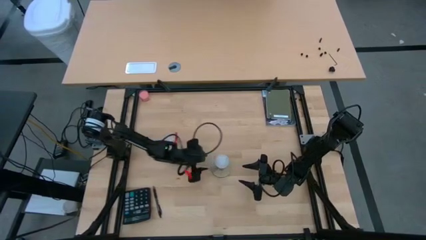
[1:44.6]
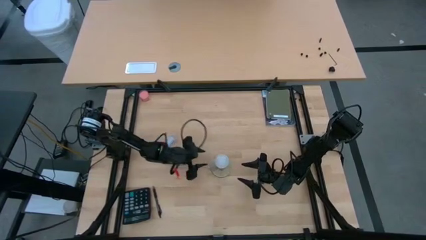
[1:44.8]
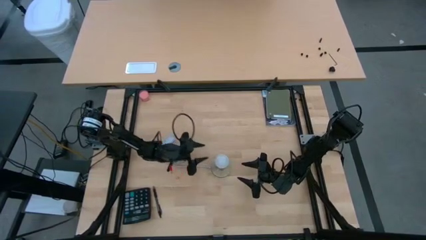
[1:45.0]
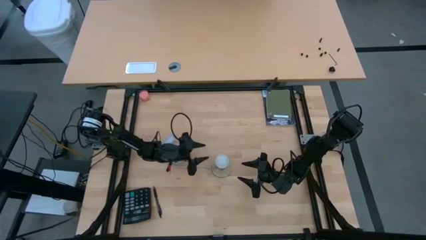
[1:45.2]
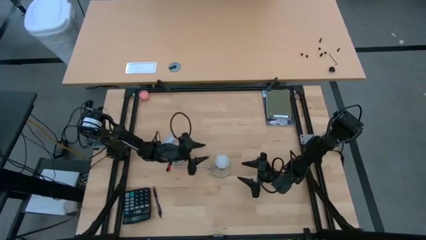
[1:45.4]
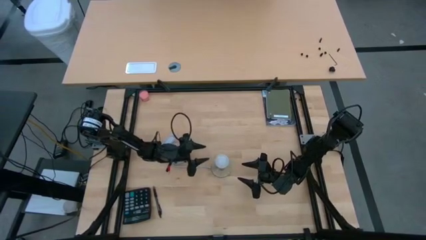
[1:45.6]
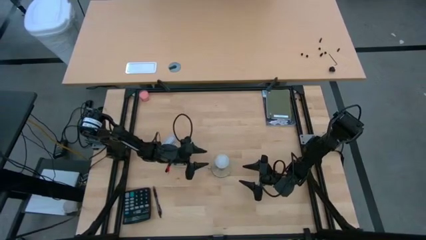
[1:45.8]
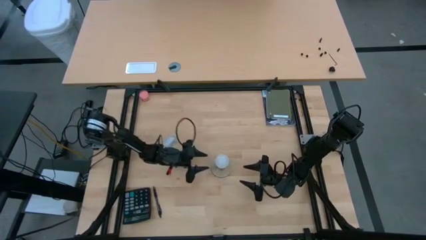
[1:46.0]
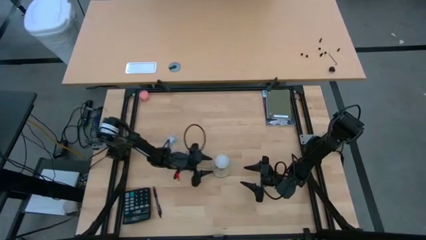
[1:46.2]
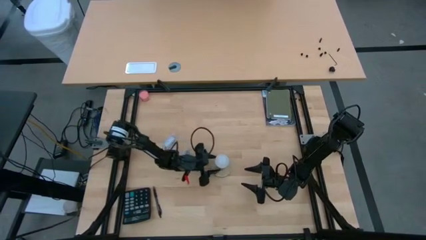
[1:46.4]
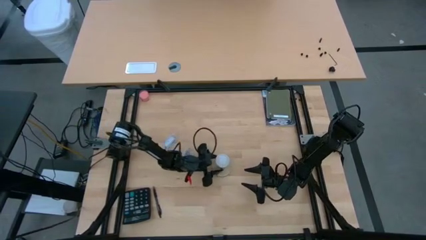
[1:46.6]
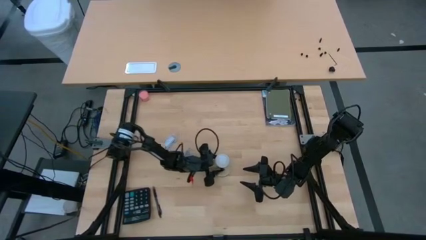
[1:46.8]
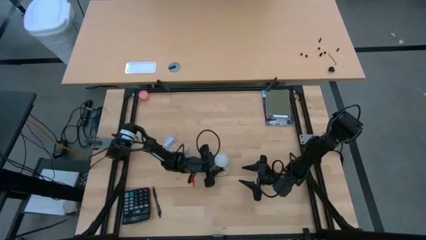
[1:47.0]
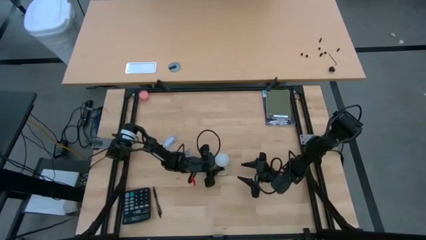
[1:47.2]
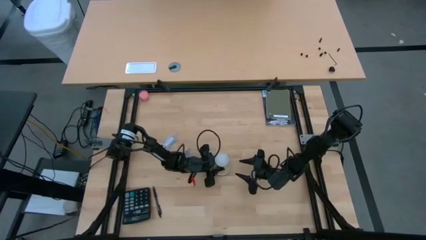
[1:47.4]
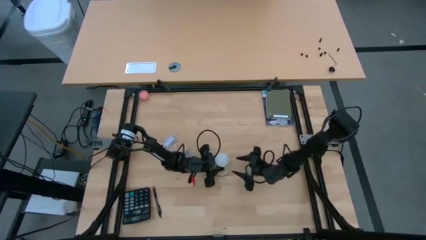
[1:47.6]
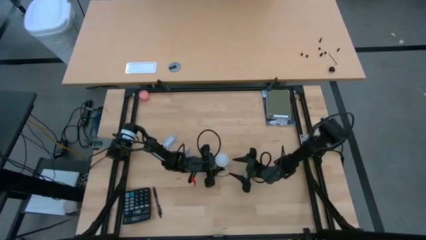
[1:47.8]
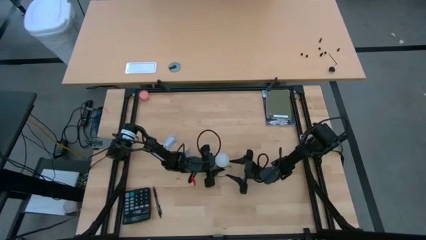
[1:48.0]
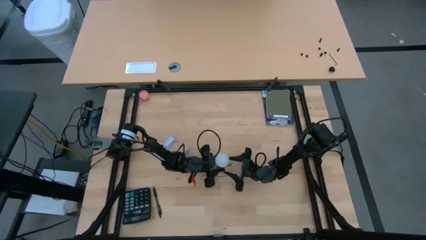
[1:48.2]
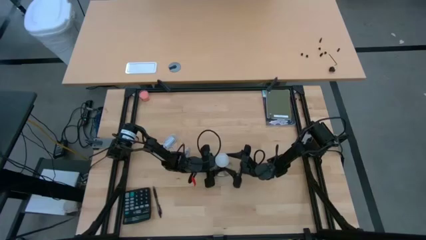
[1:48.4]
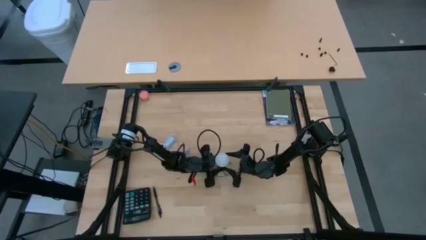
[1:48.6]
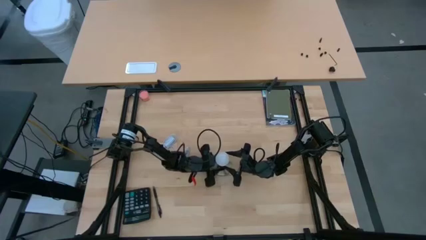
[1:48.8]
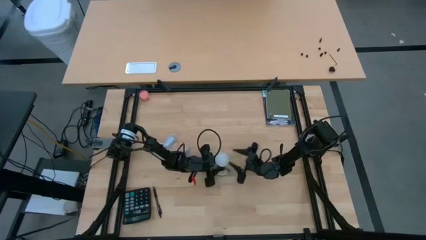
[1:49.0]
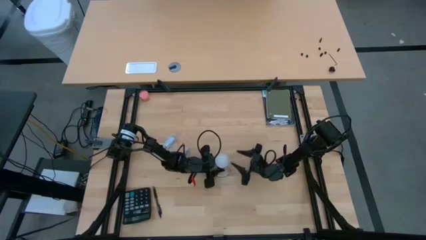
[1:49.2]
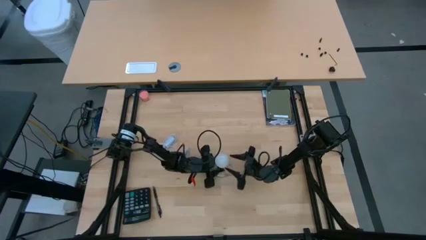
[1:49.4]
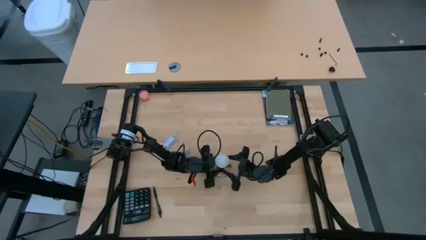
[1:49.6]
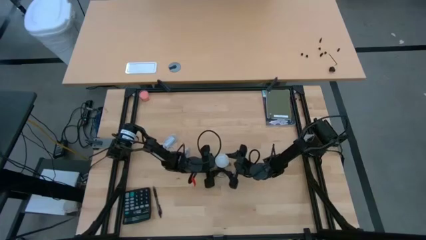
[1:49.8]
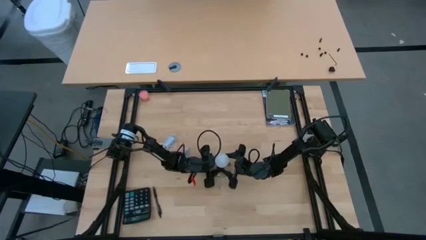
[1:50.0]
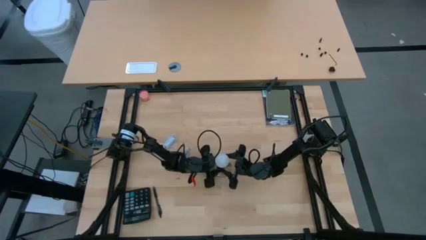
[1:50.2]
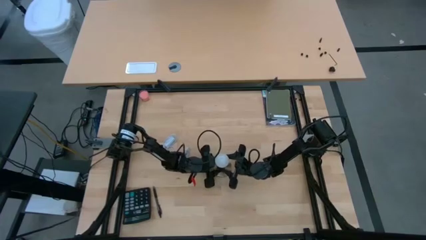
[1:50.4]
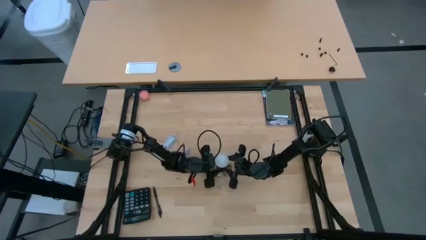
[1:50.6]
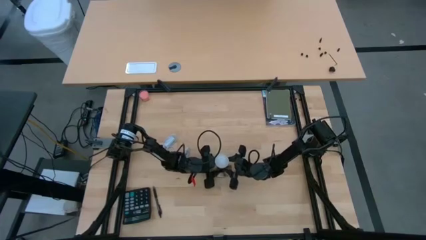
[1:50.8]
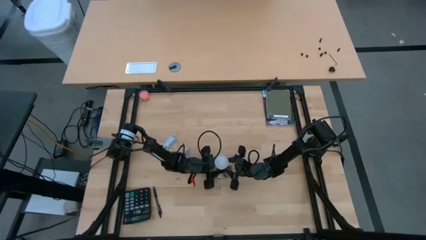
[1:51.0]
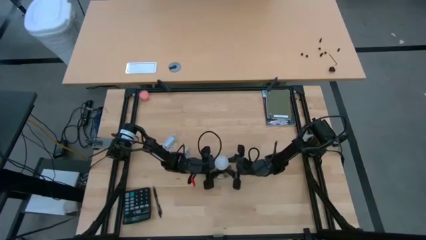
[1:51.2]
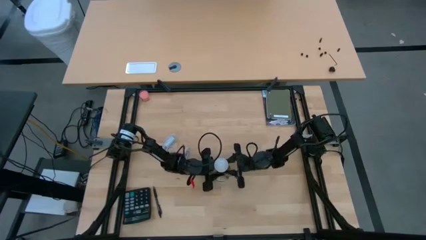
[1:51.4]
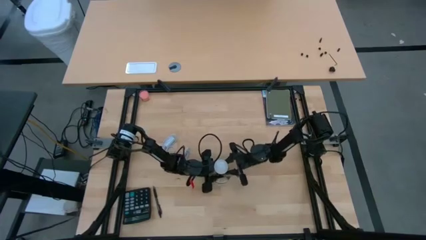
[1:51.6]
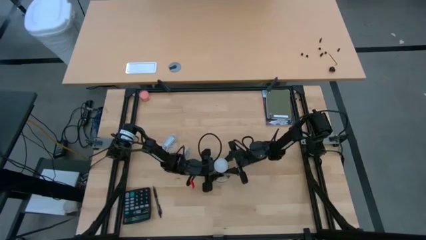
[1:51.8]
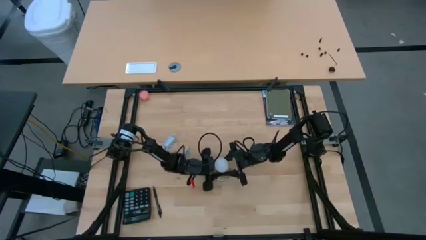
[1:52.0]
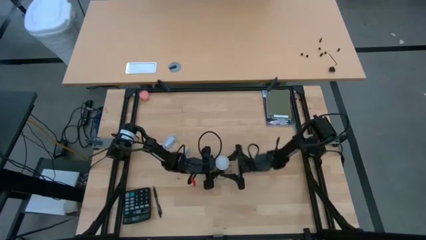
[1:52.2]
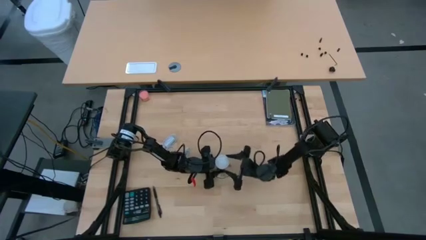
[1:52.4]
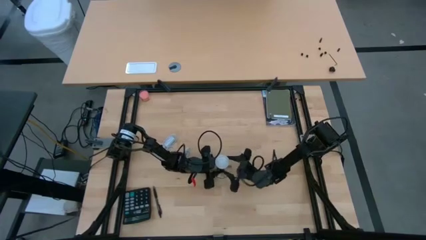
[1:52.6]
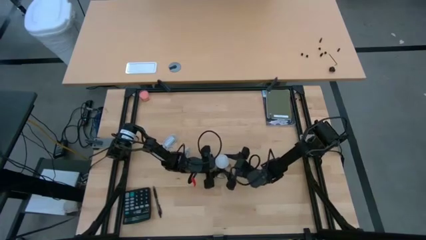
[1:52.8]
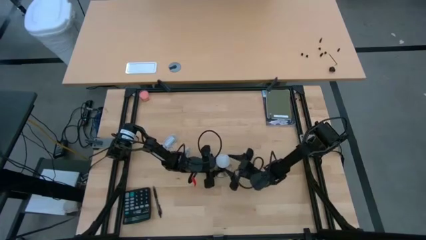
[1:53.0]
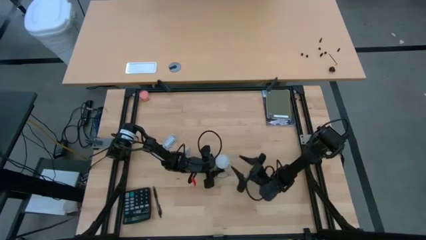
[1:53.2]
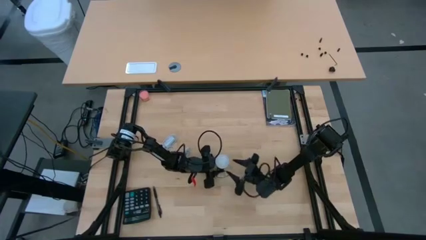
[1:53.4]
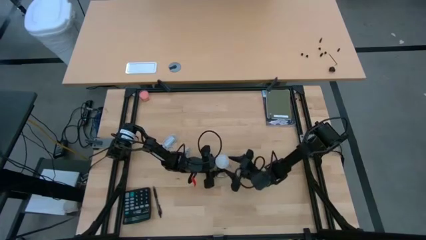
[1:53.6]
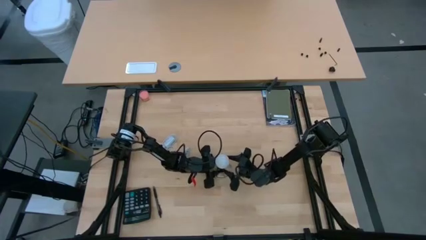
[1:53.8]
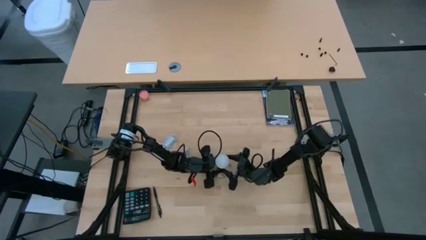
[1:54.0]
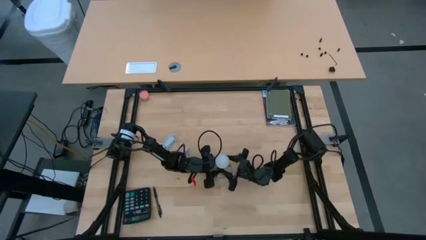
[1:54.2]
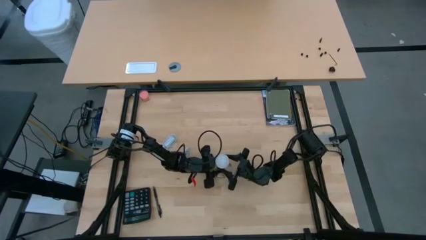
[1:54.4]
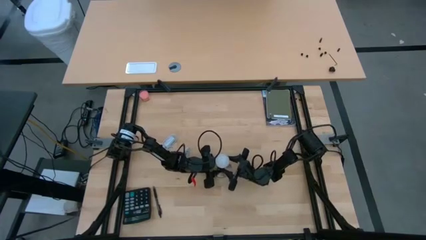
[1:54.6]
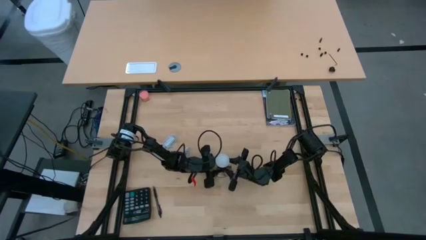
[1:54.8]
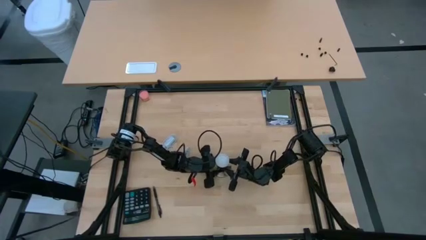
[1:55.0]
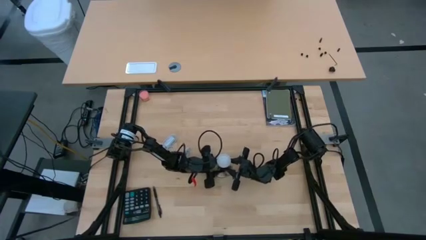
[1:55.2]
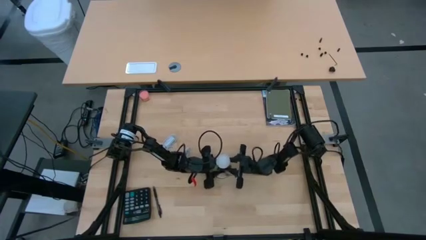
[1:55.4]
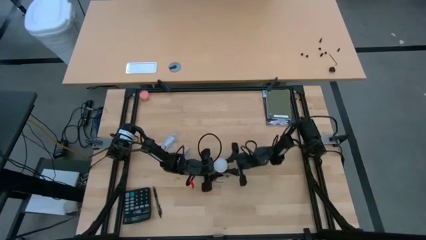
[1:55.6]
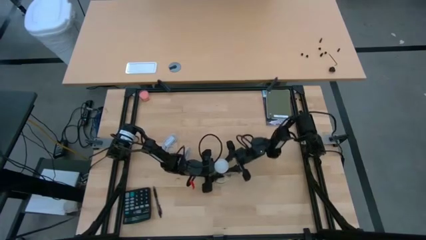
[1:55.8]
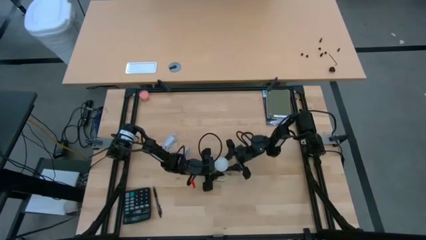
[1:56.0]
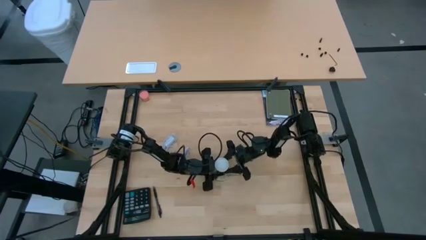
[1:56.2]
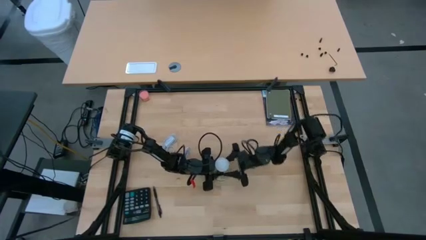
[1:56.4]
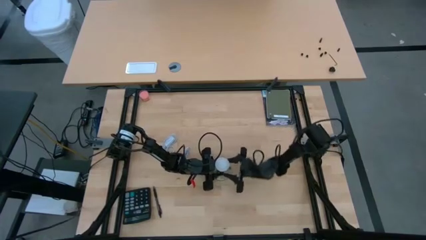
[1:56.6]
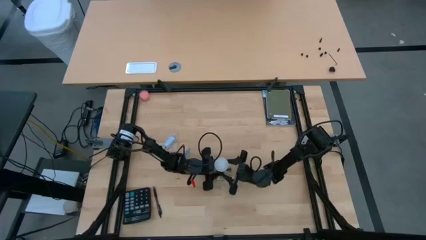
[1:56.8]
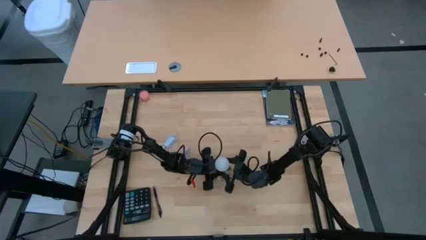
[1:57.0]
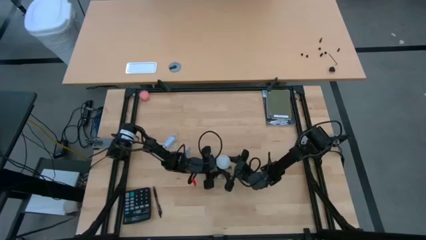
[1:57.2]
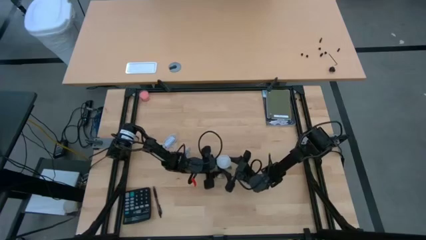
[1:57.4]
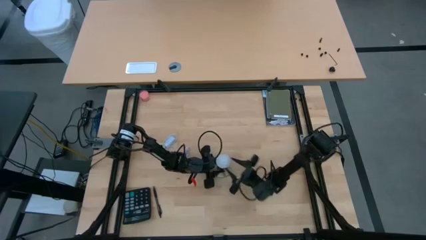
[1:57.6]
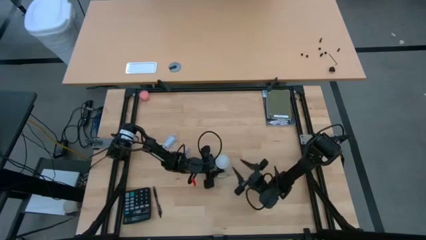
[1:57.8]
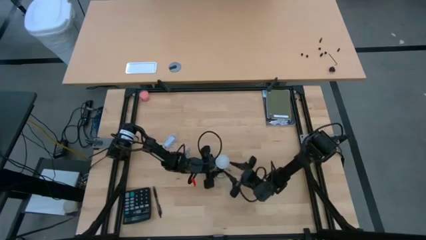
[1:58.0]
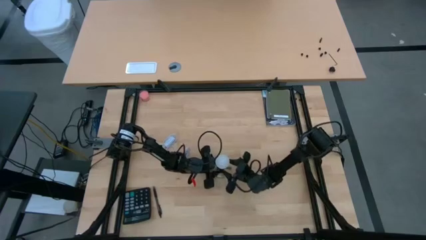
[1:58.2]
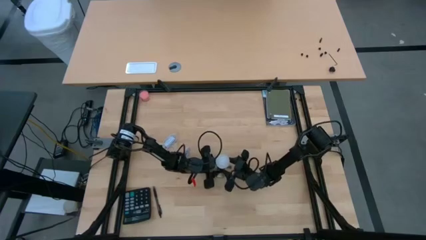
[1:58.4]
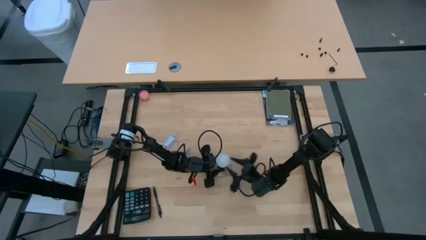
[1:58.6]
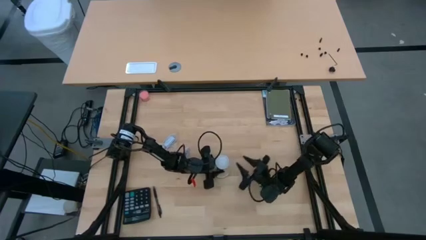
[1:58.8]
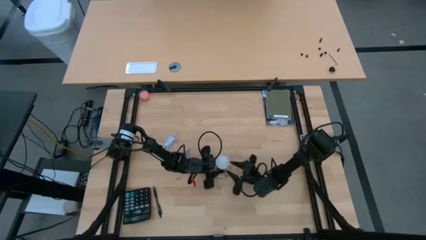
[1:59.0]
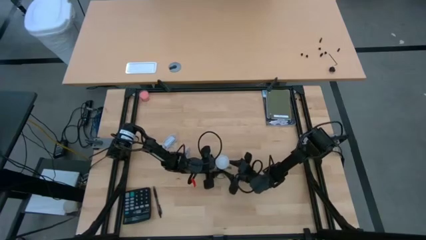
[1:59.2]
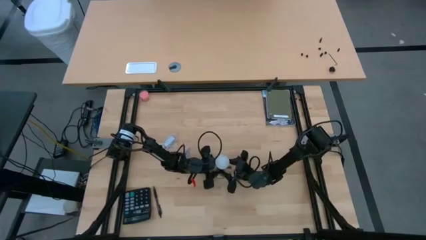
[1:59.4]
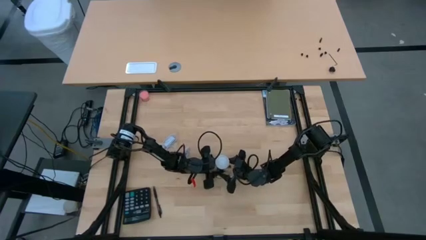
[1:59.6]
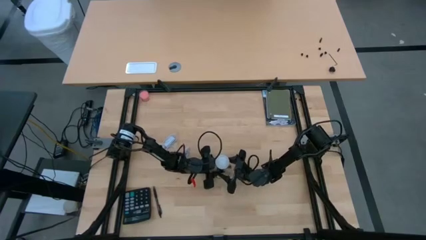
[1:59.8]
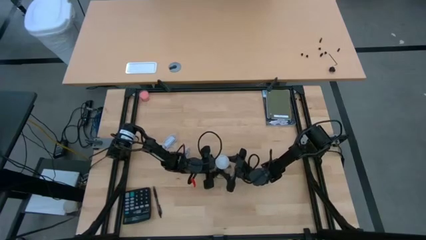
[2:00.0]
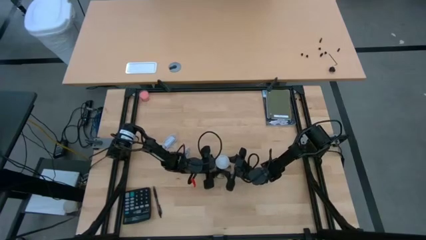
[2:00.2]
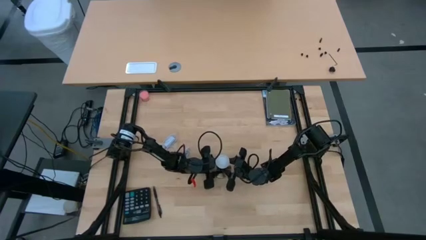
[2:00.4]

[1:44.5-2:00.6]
Task: Screw lightbulb
Remove the lightbulb from the lamp
